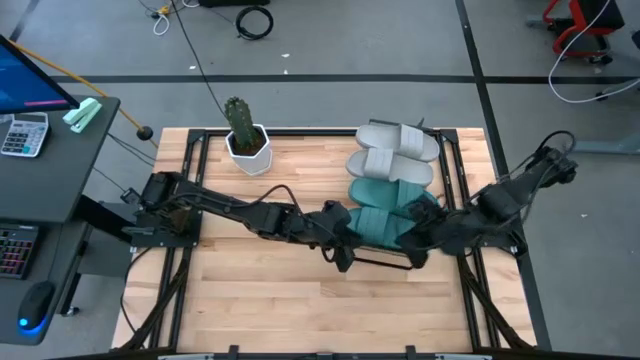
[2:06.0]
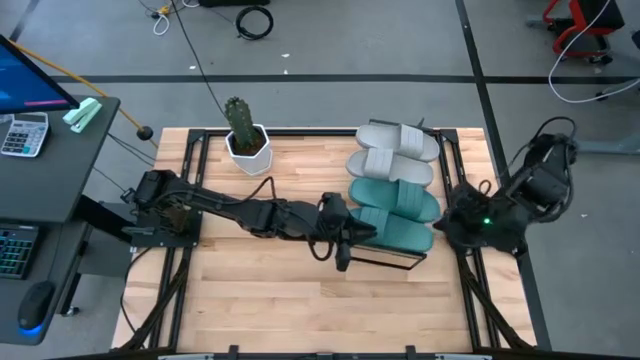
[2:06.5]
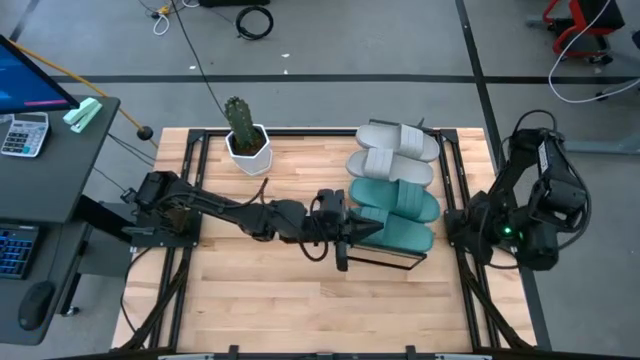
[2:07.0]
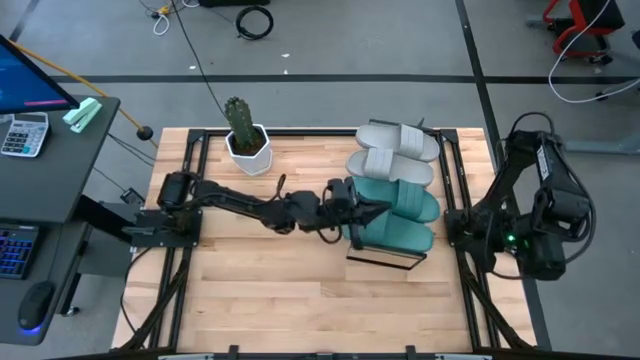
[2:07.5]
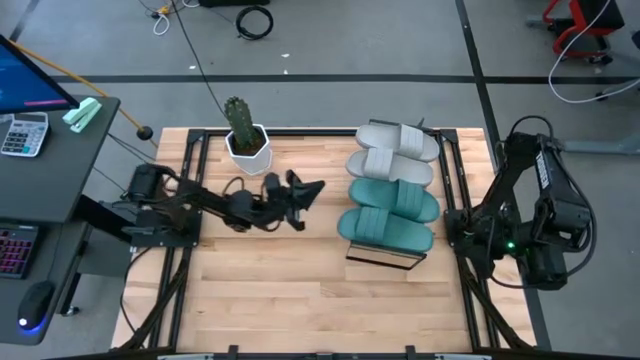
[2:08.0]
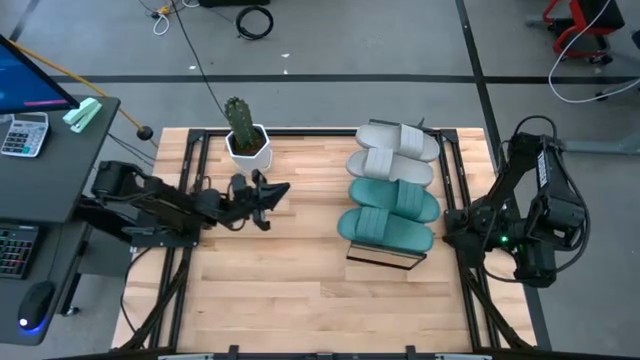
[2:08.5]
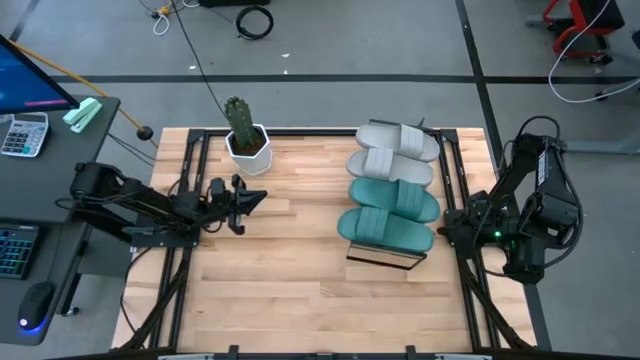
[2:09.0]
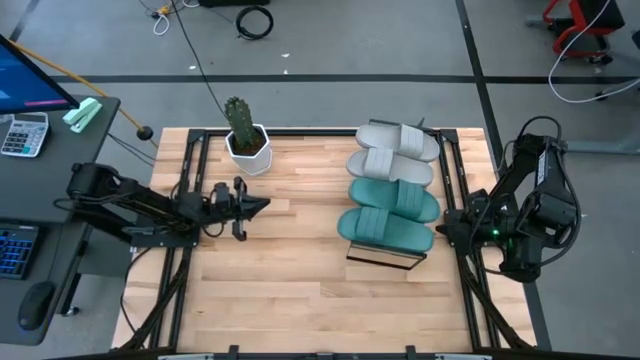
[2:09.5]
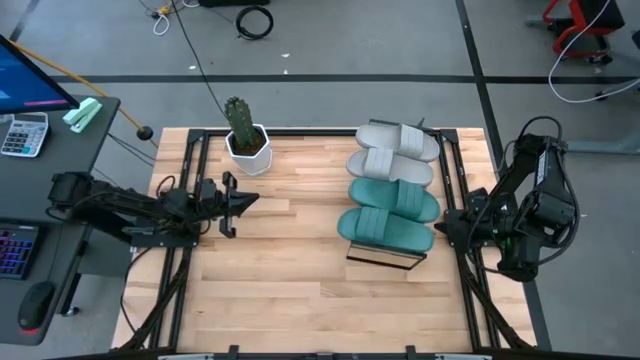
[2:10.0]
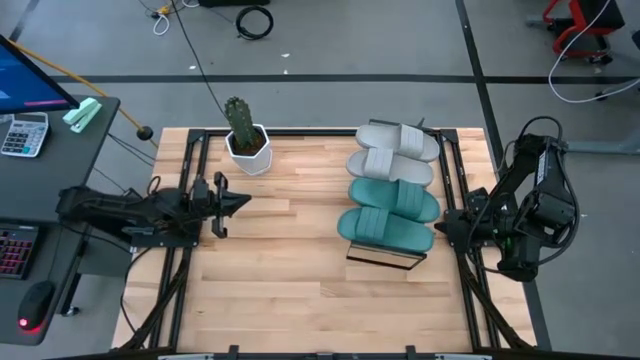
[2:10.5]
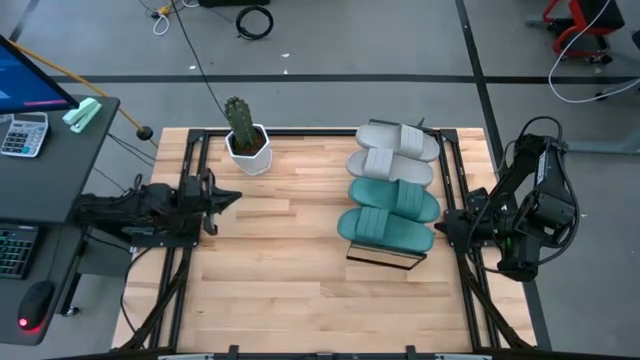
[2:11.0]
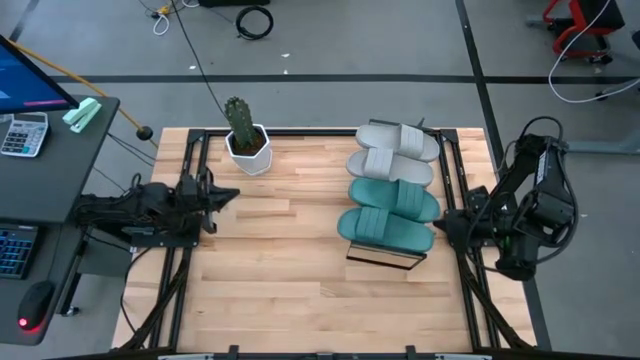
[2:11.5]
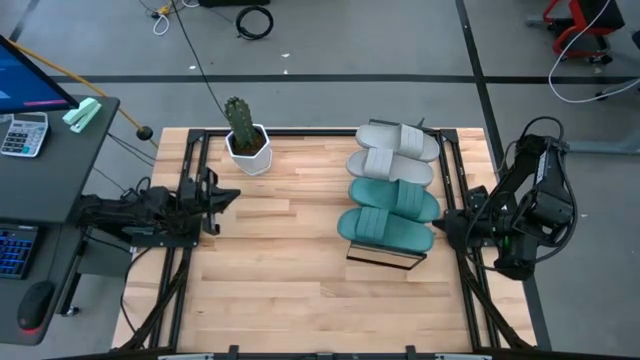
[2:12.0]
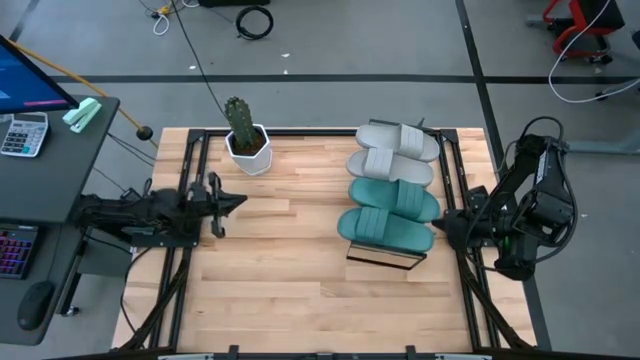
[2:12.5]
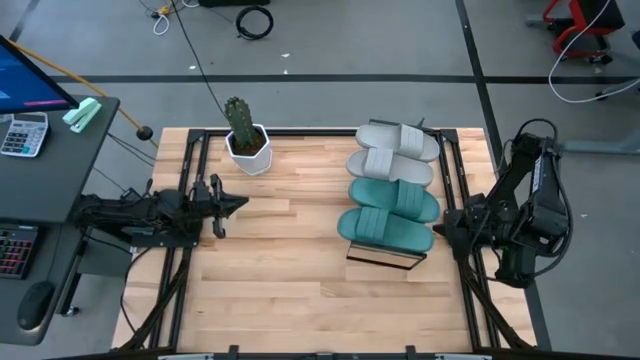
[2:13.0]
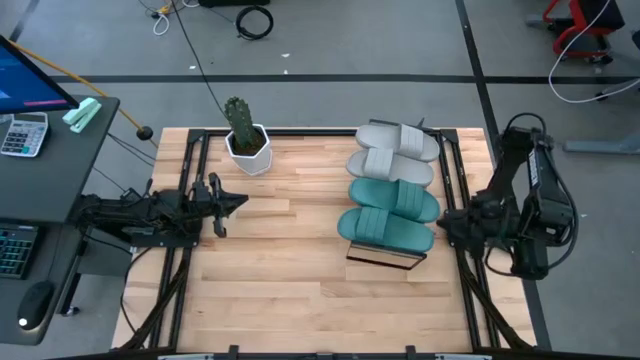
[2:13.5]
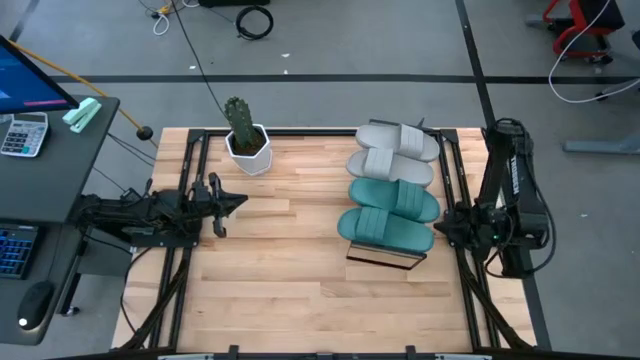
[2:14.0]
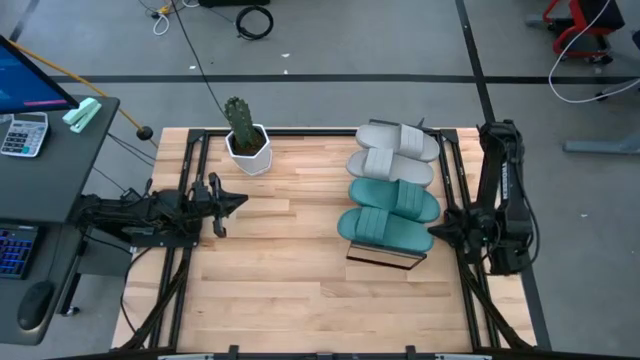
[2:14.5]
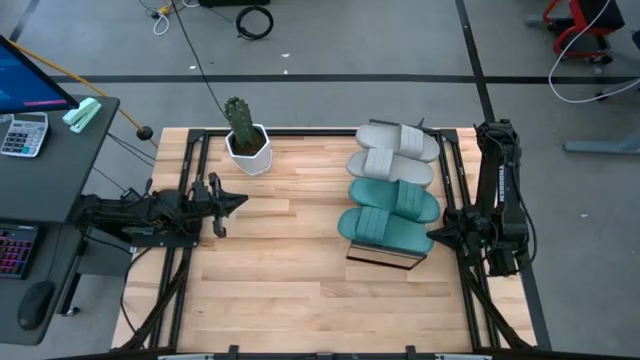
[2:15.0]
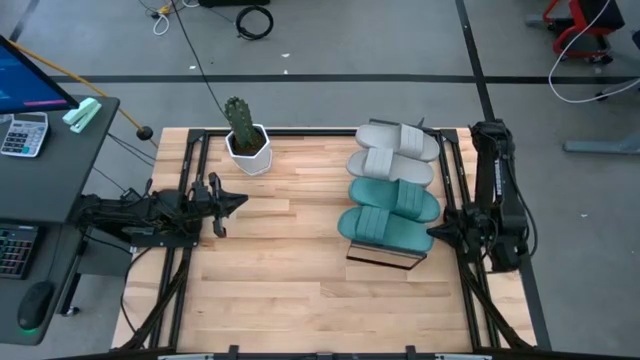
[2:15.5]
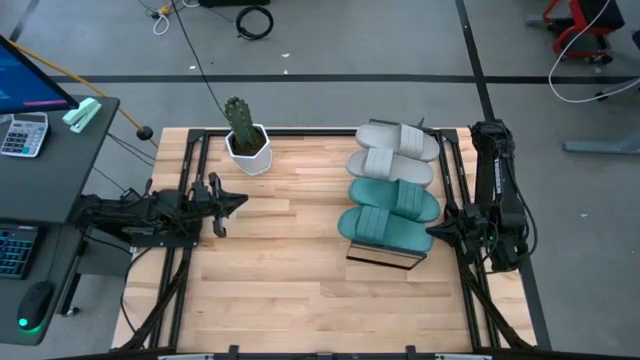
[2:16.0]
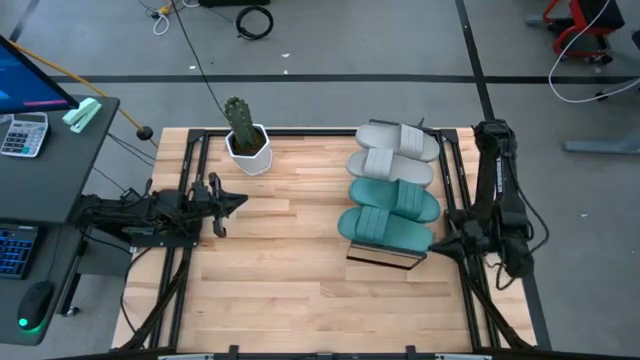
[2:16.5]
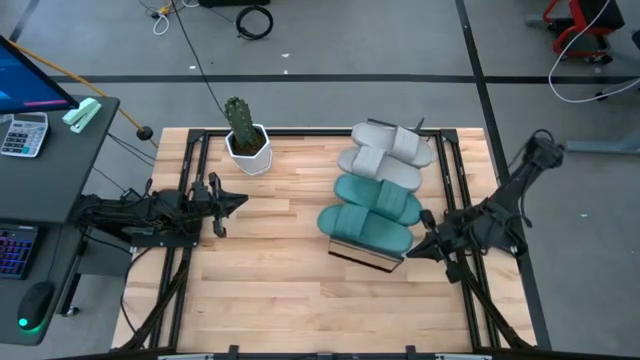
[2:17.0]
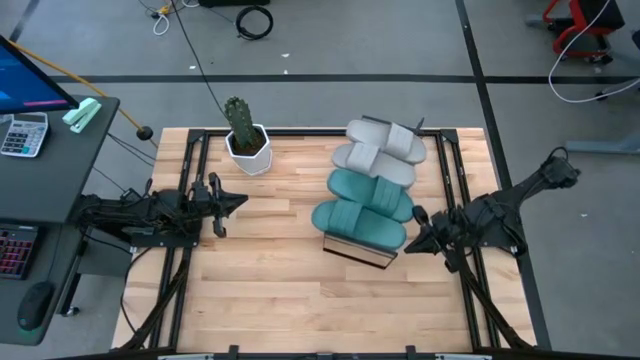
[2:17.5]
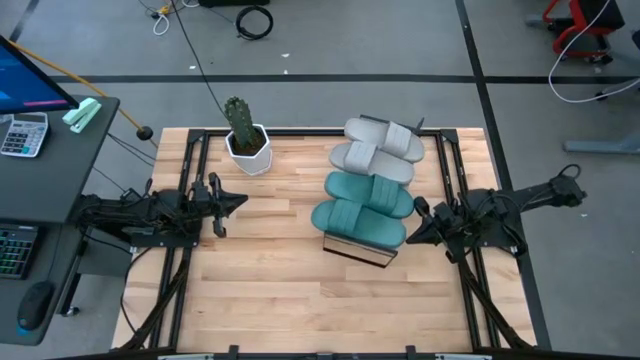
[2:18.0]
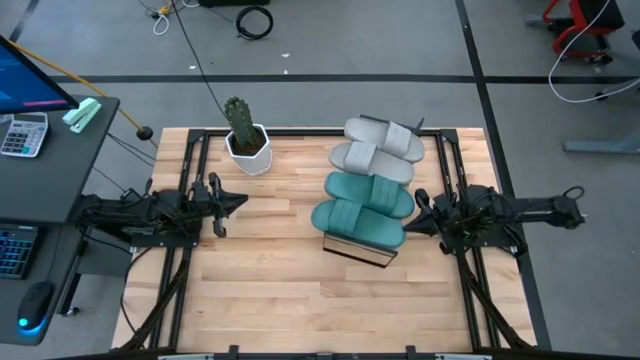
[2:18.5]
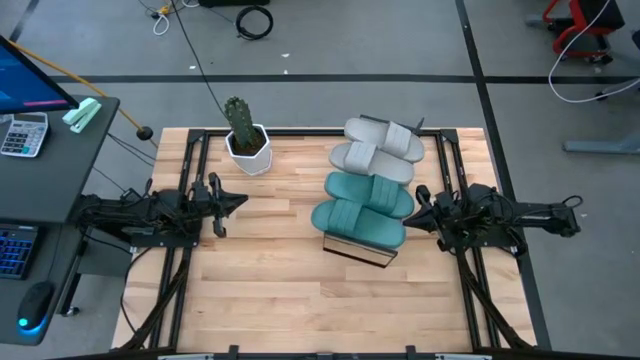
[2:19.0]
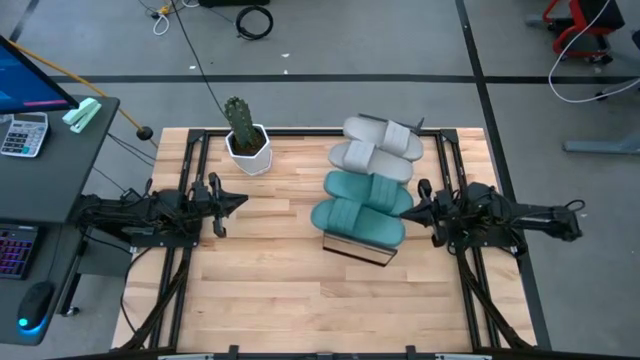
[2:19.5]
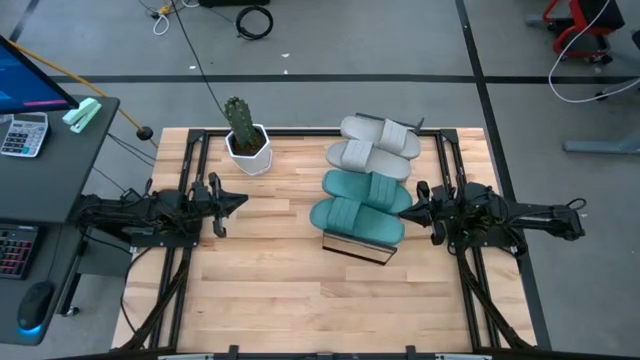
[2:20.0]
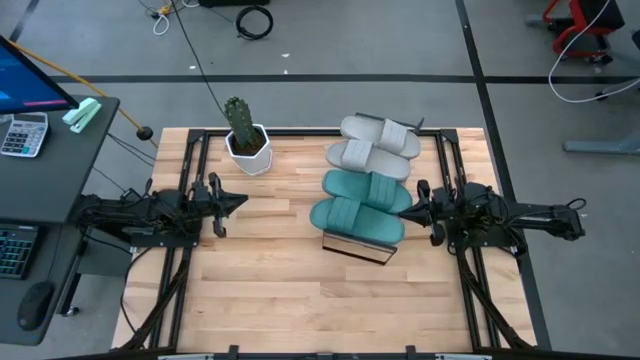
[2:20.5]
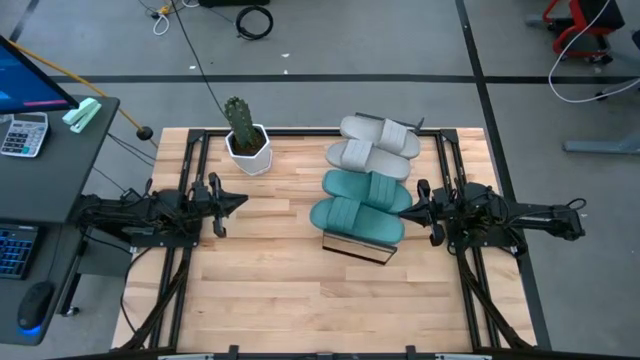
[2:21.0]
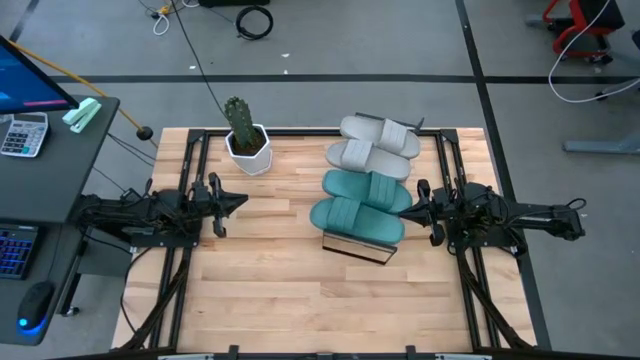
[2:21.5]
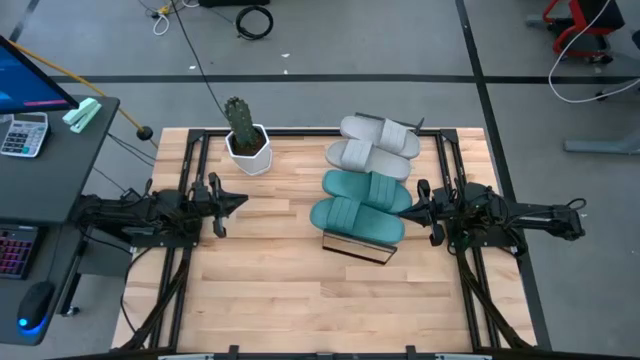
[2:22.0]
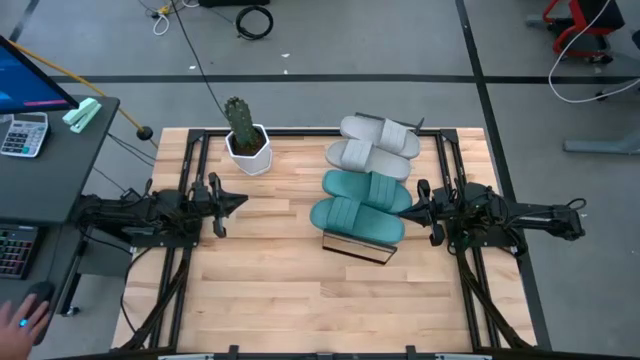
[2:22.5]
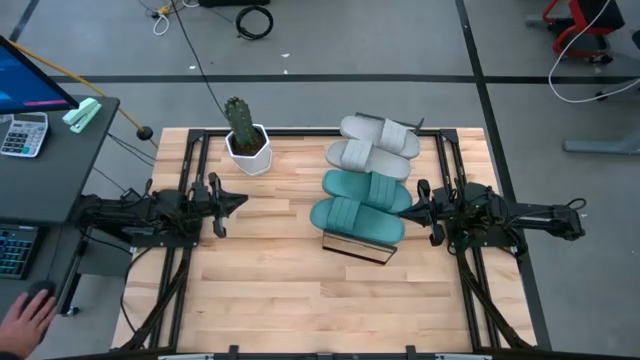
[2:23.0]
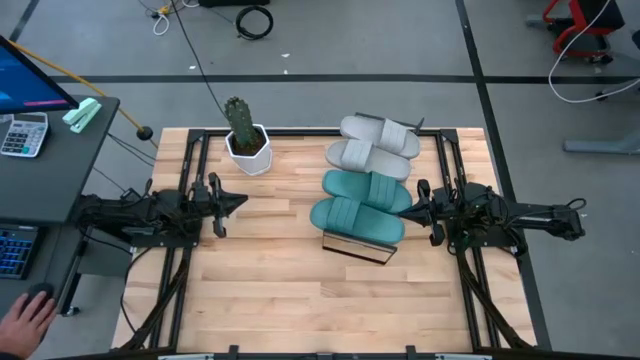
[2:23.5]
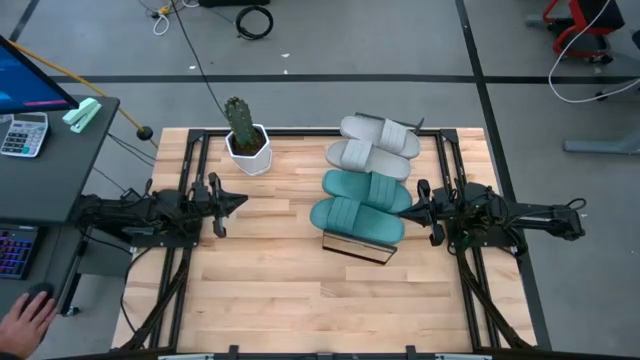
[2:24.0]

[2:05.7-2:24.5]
Task: Pick and place slides into the shelf
Return to Home Position

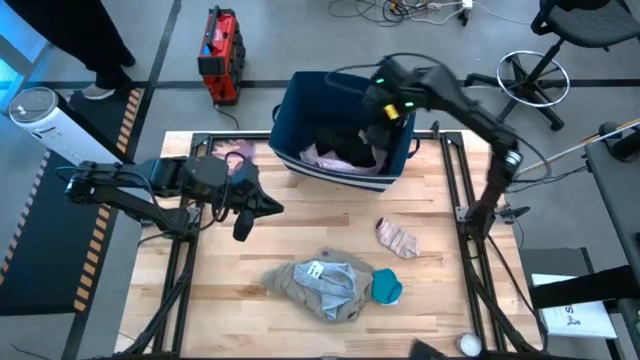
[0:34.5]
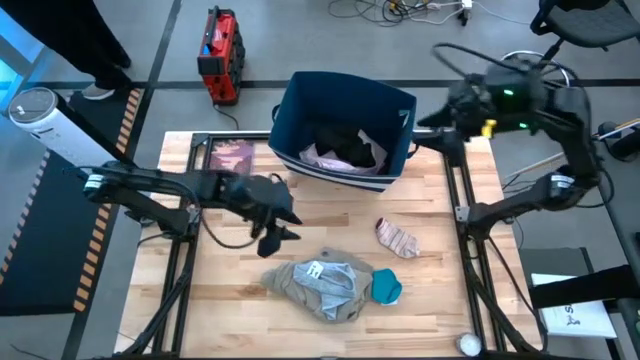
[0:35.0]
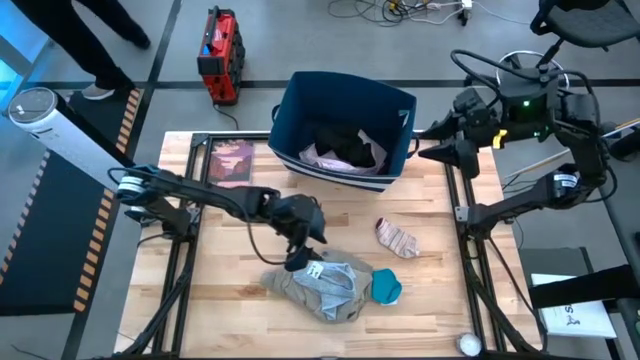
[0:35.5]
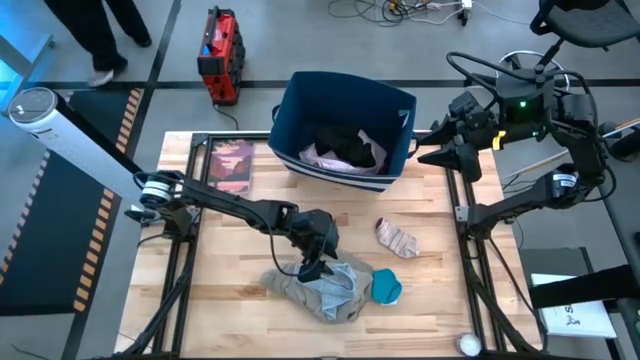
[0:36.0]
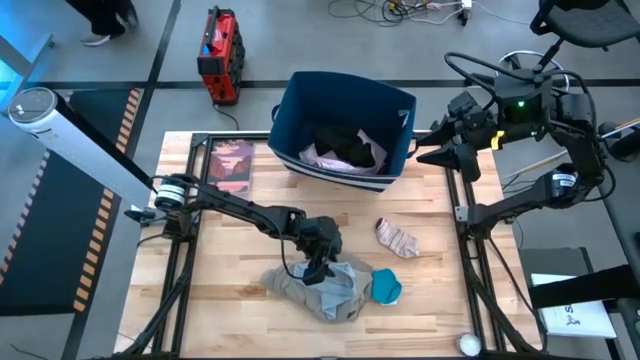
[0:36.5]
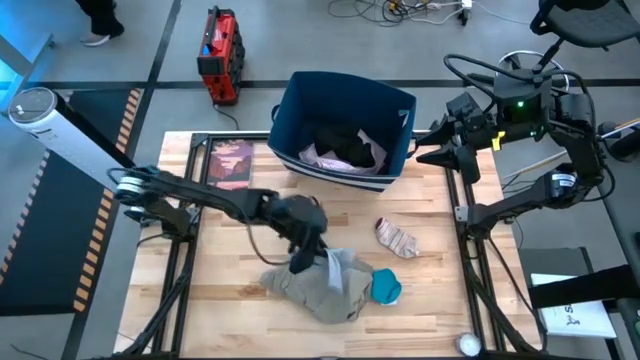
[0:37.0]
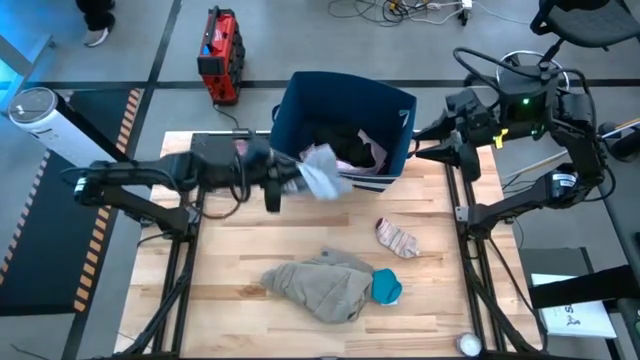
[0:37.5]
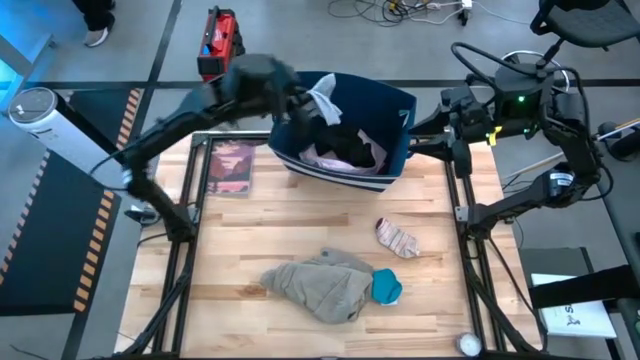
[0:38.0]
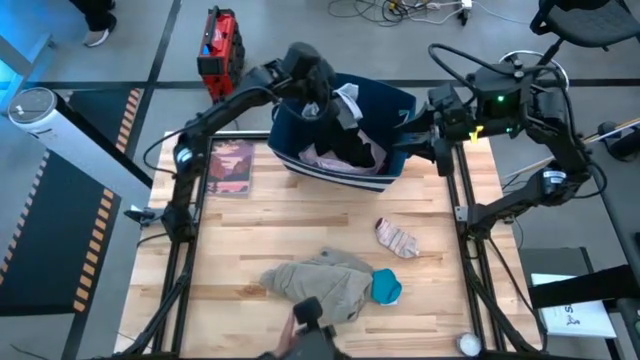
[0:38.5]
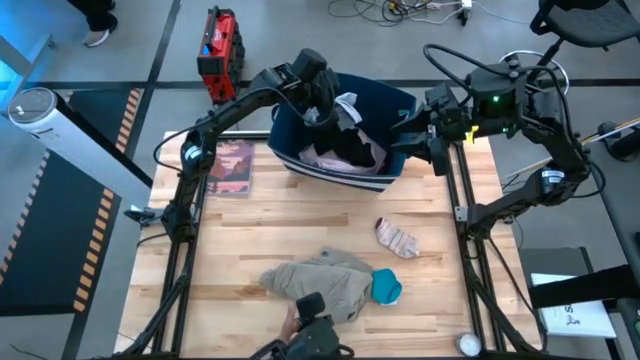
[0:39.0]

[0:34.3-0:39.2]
Task: Sort clothes
Put the gray underwear into the blue laundry bin
